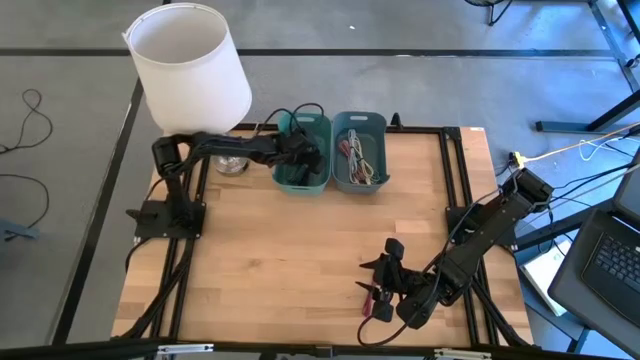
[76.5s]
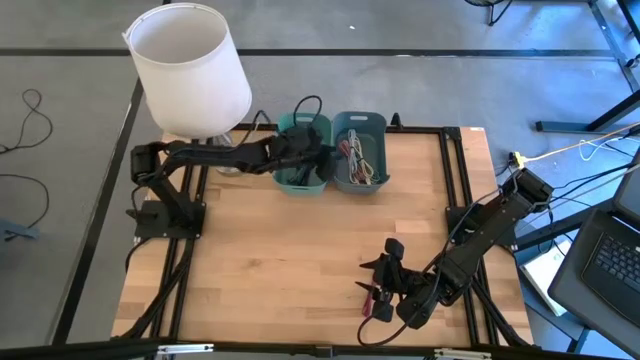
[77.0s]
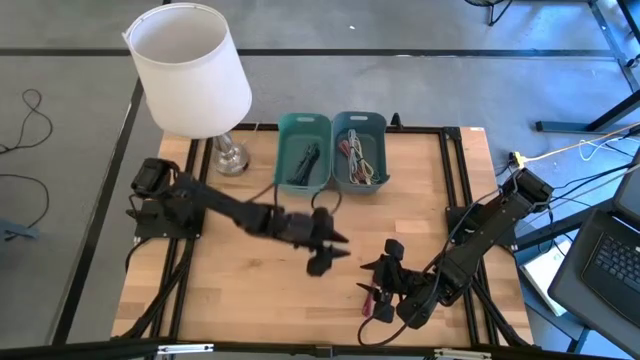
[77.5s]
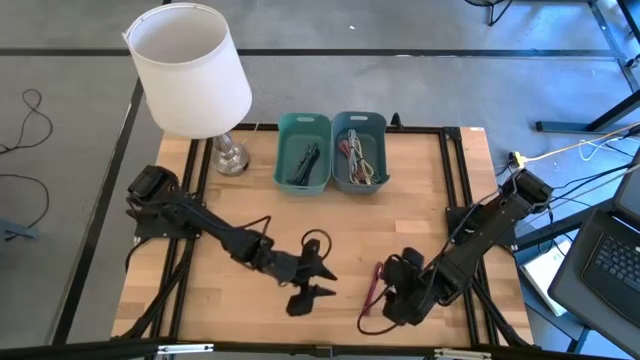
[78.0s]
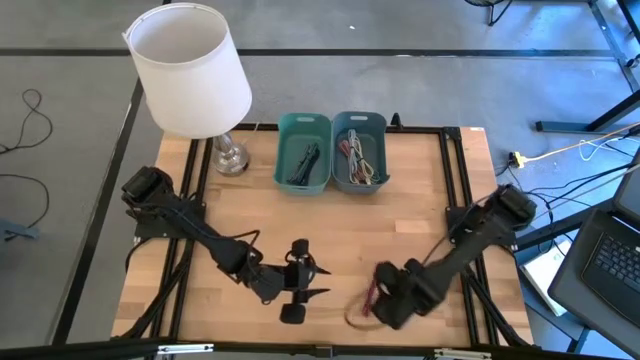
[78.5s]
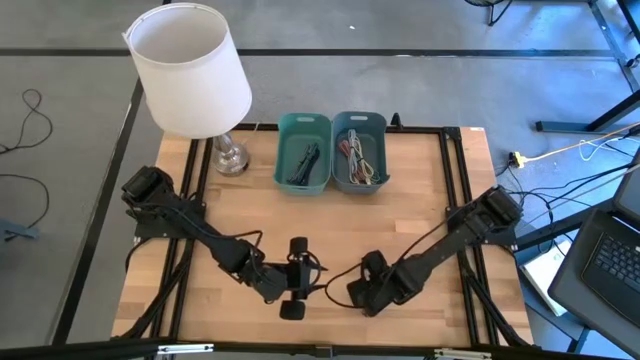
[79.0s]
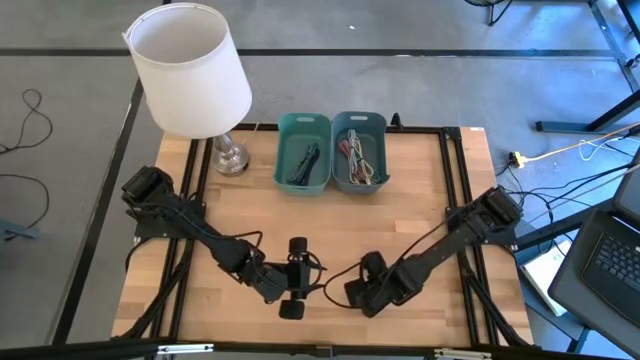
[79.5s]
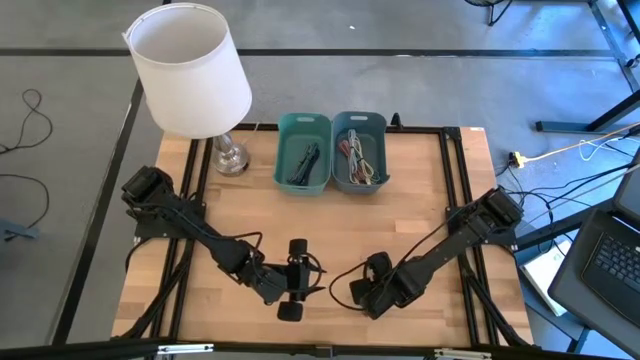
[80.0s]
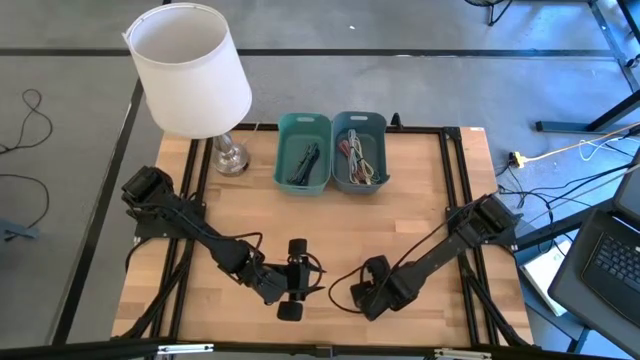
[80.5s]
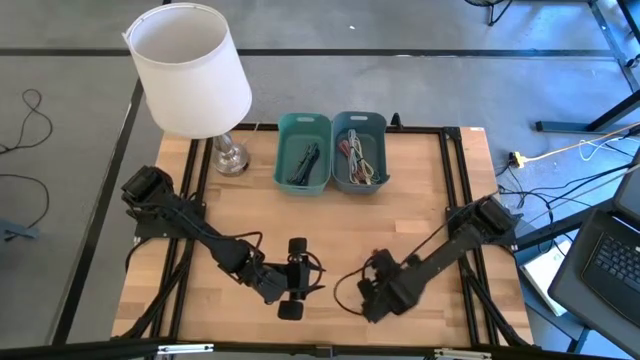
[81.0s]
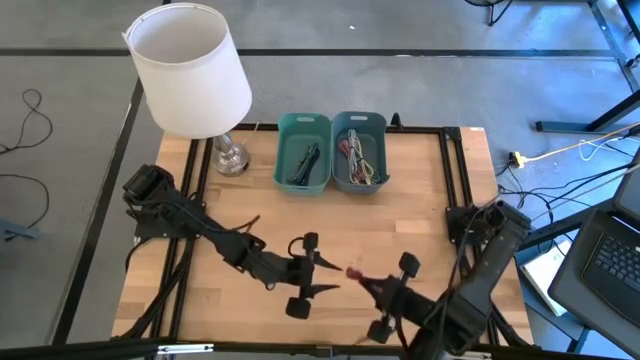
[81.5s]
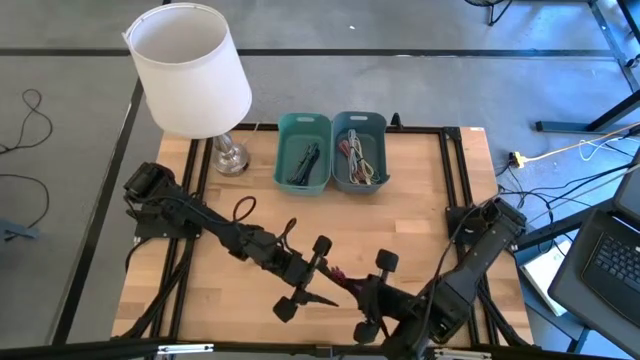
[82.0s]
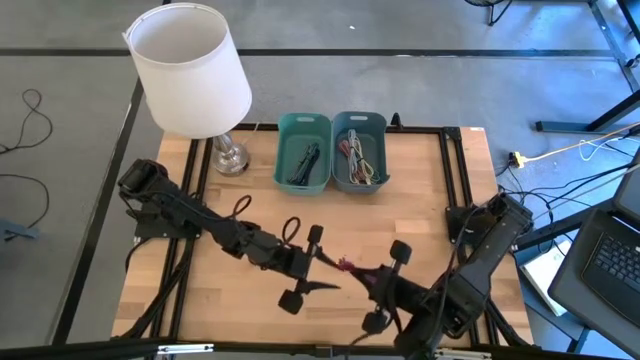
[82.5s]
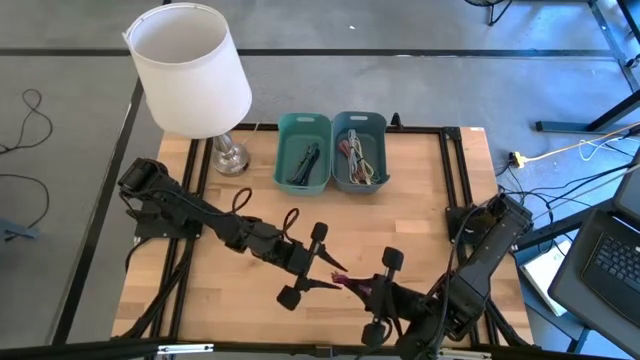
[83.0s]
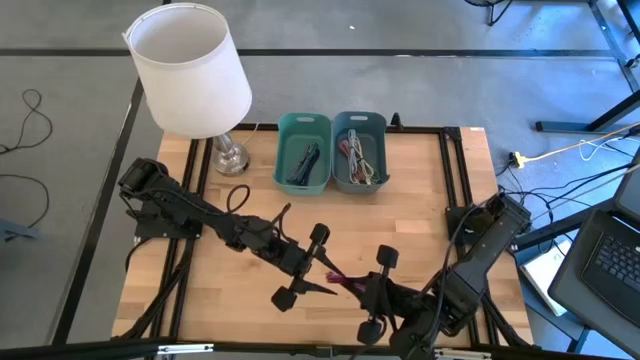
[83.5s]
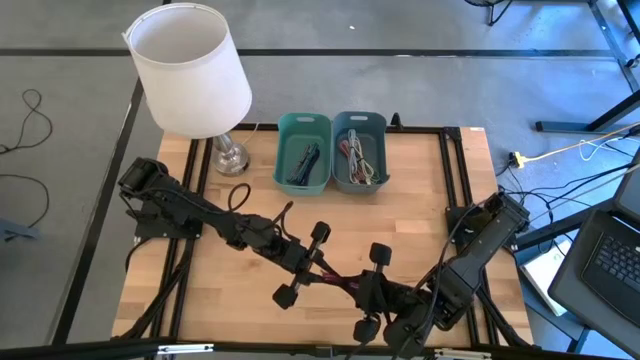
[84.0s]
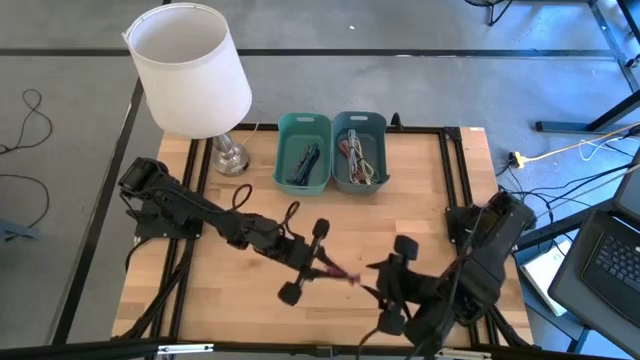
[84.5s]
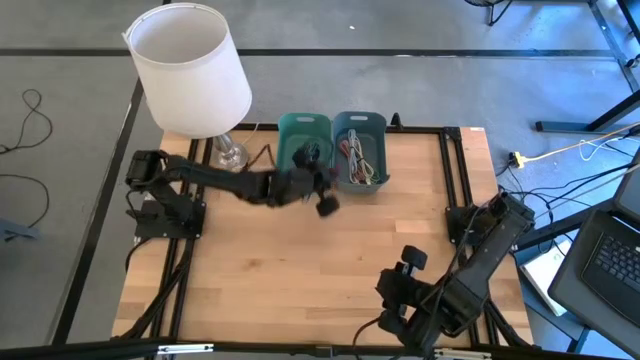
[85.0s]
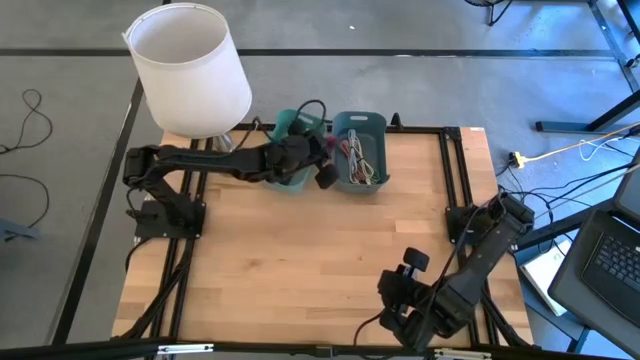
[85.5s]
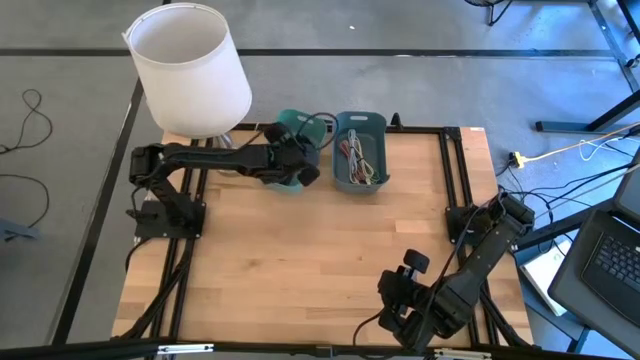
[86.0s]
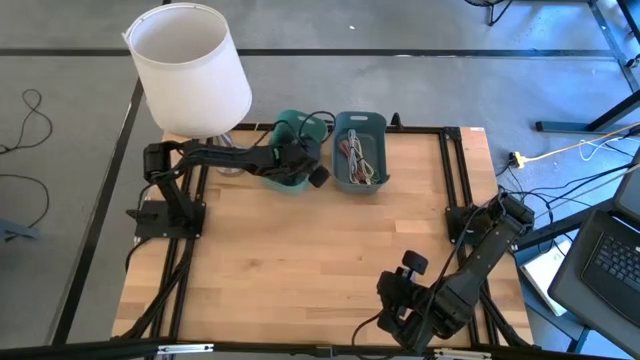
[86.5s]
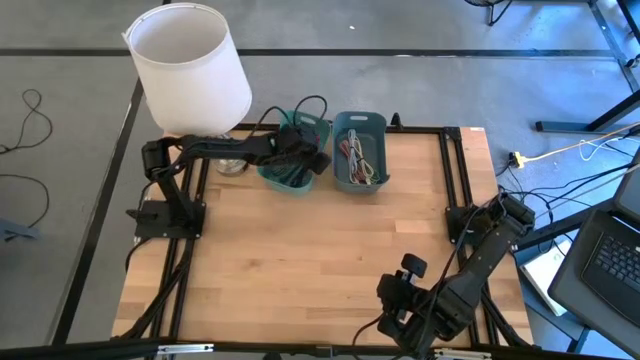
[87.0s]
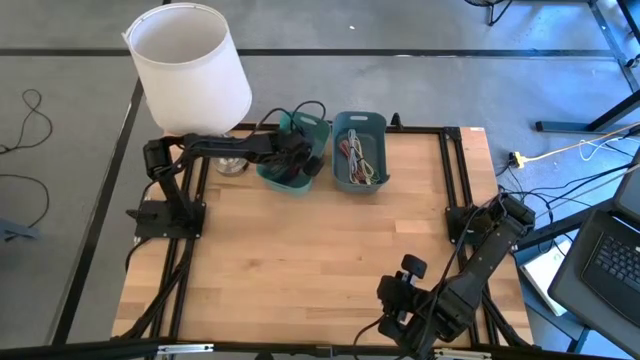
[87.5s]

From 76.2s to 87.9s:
Put the red and black charger cable into the green bin

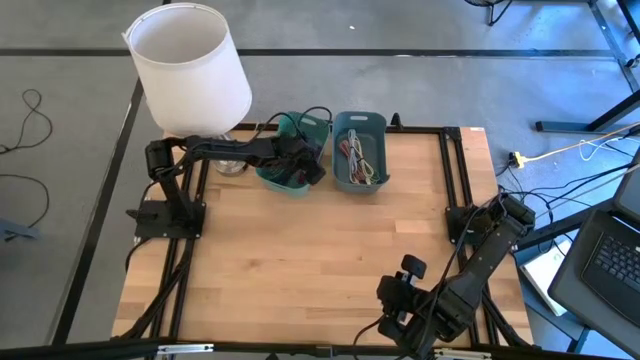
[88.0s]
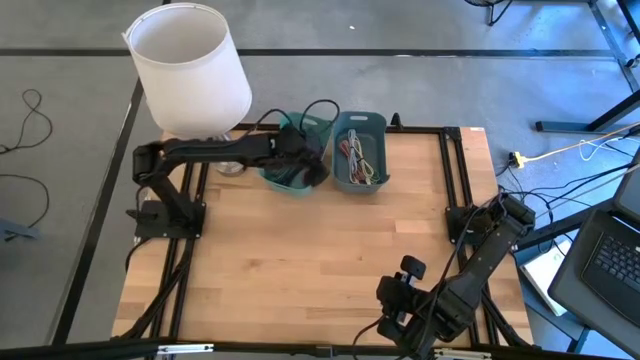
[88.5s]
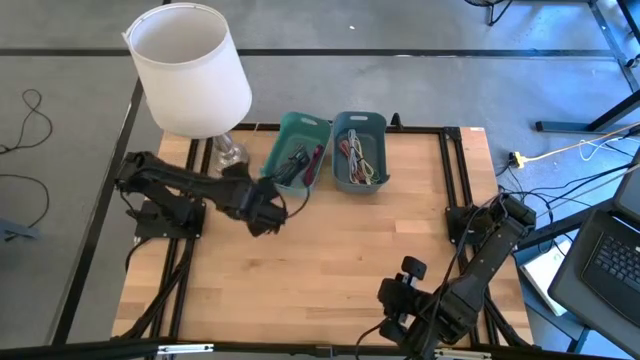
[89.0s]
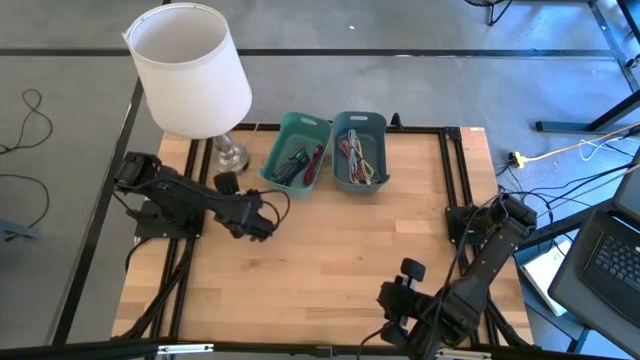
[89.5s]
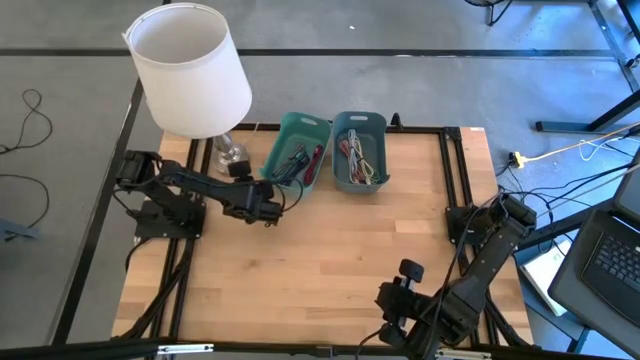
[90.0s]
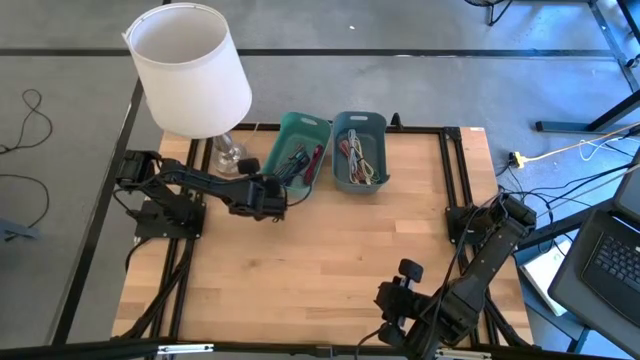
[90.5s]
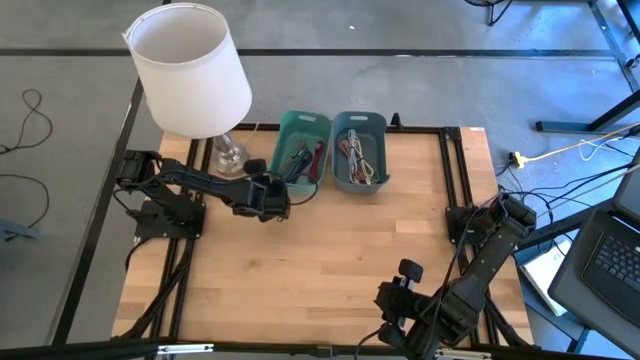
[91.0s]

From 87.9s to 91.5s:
Adjust the green bin on the table
